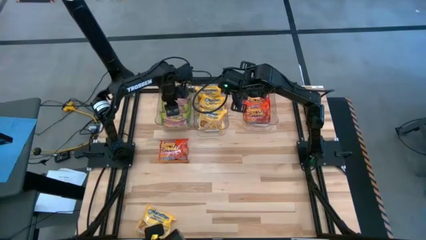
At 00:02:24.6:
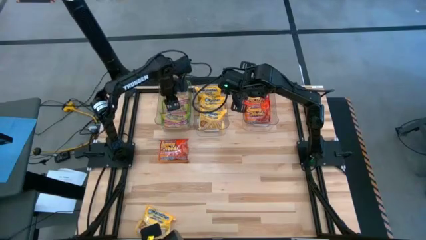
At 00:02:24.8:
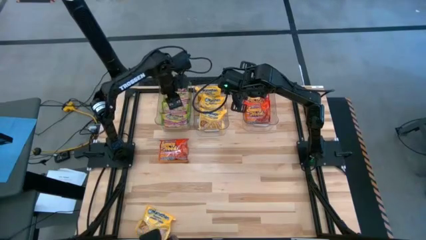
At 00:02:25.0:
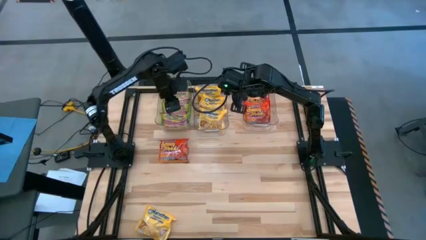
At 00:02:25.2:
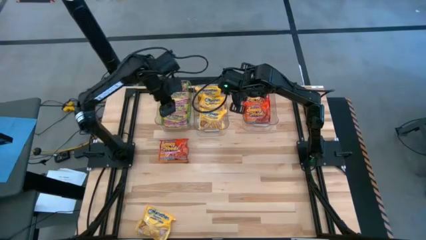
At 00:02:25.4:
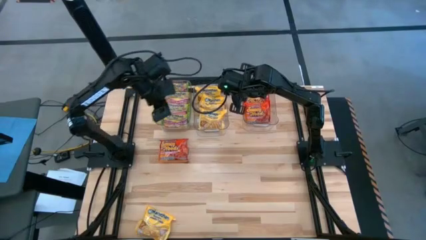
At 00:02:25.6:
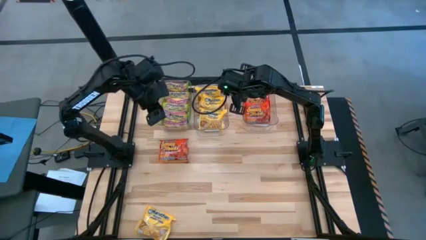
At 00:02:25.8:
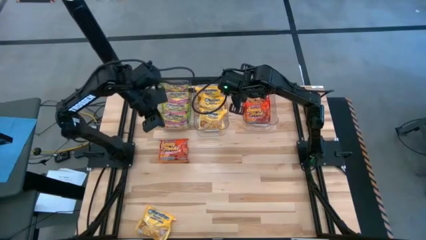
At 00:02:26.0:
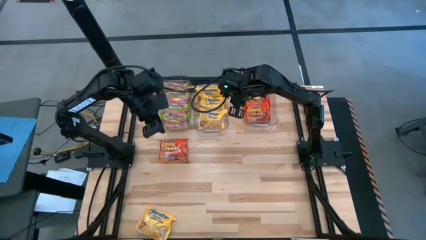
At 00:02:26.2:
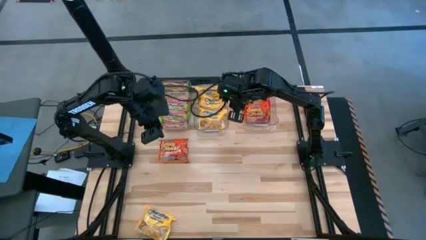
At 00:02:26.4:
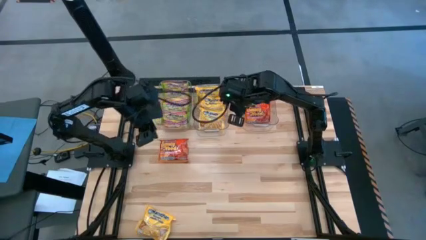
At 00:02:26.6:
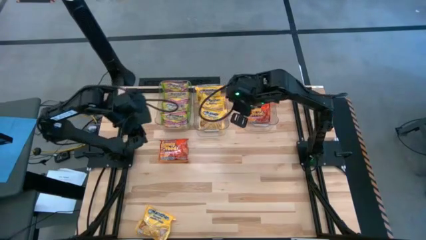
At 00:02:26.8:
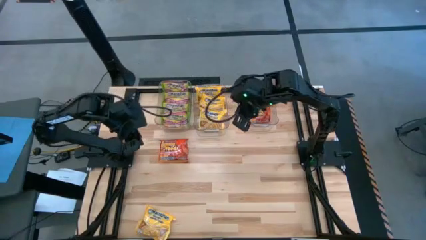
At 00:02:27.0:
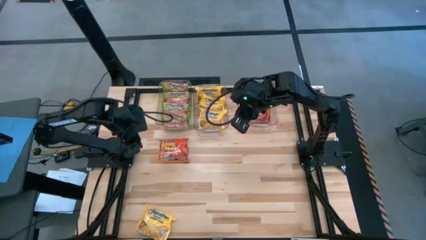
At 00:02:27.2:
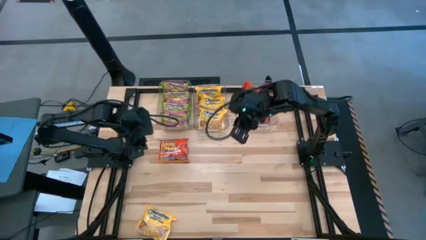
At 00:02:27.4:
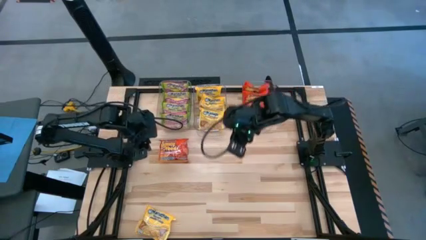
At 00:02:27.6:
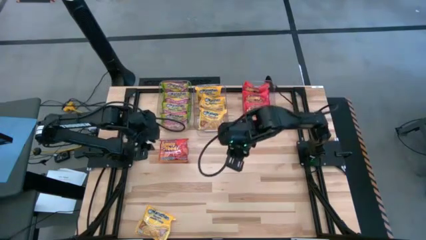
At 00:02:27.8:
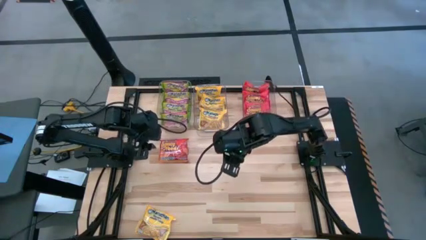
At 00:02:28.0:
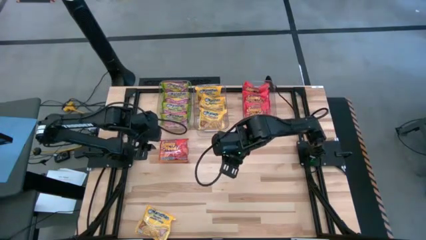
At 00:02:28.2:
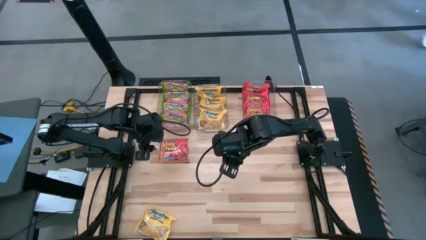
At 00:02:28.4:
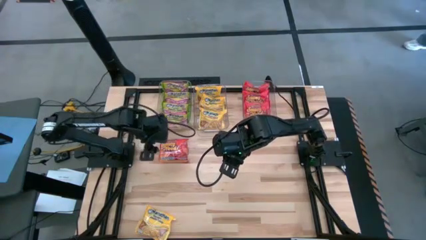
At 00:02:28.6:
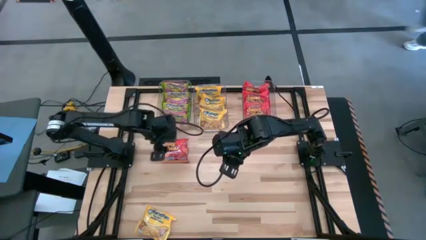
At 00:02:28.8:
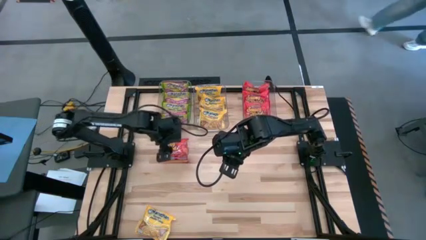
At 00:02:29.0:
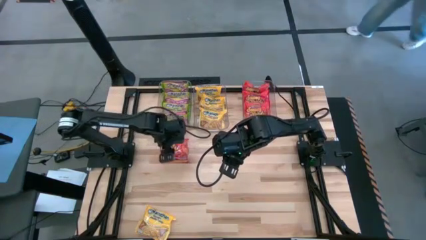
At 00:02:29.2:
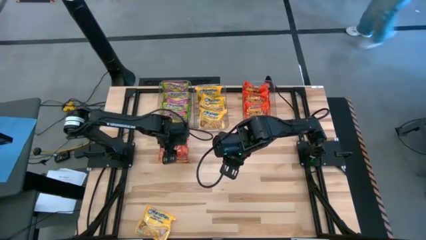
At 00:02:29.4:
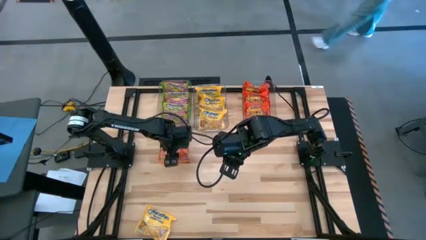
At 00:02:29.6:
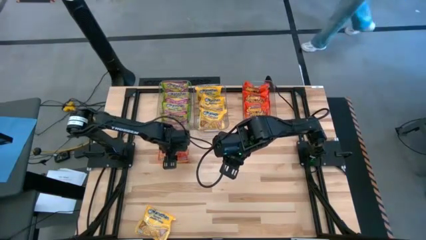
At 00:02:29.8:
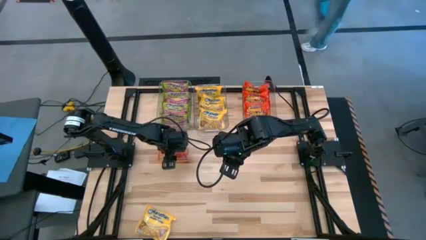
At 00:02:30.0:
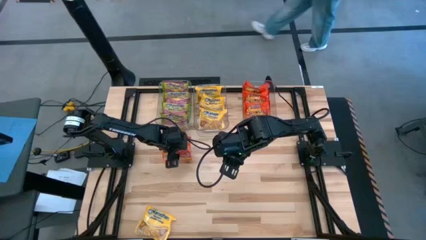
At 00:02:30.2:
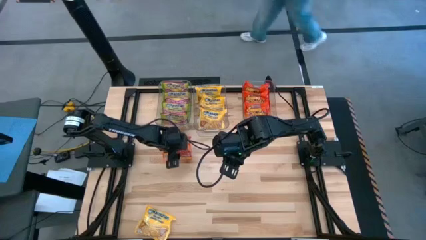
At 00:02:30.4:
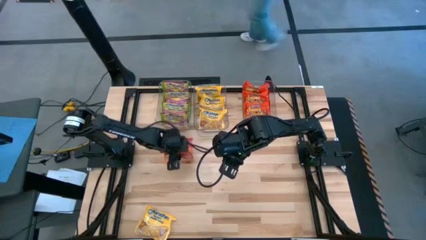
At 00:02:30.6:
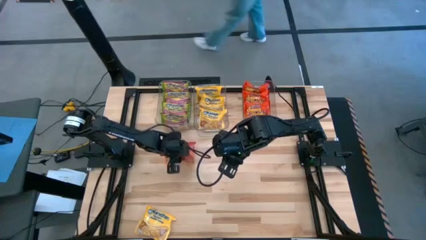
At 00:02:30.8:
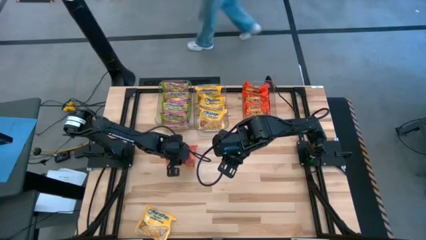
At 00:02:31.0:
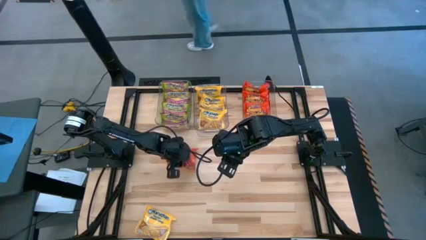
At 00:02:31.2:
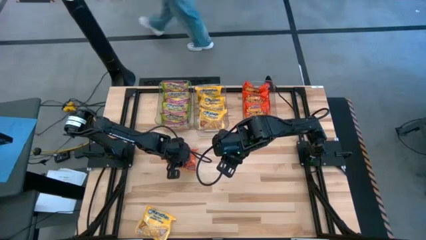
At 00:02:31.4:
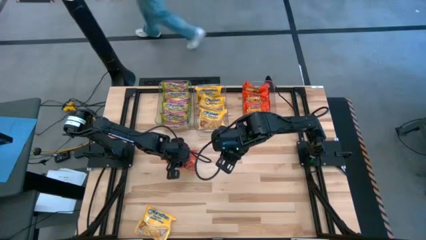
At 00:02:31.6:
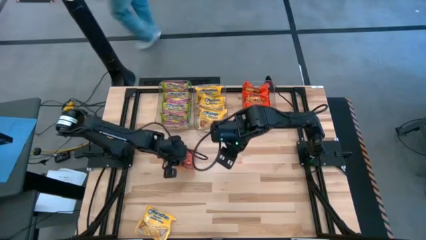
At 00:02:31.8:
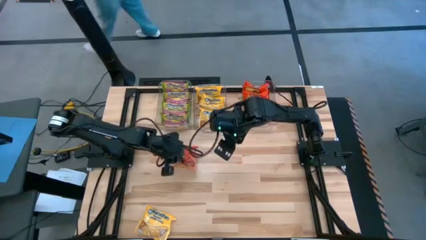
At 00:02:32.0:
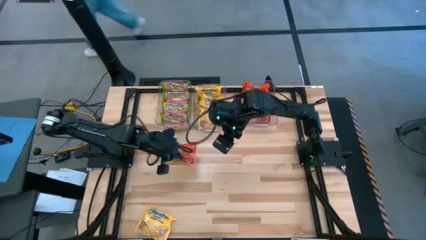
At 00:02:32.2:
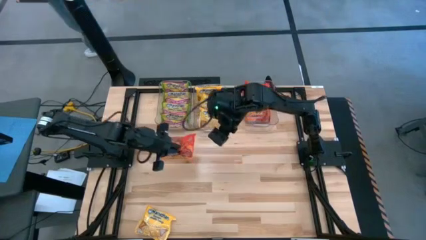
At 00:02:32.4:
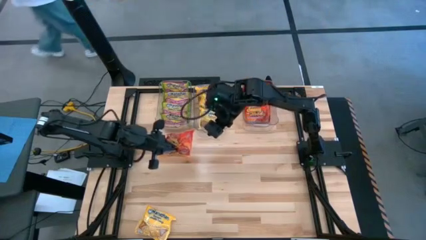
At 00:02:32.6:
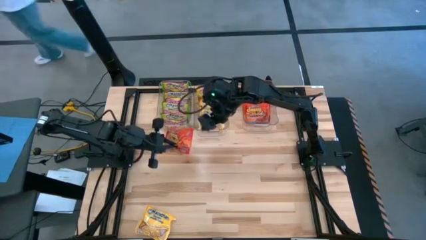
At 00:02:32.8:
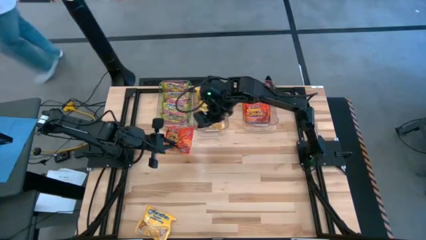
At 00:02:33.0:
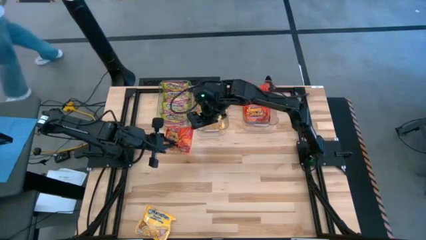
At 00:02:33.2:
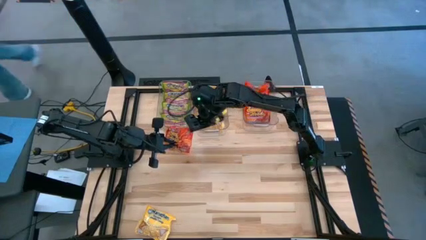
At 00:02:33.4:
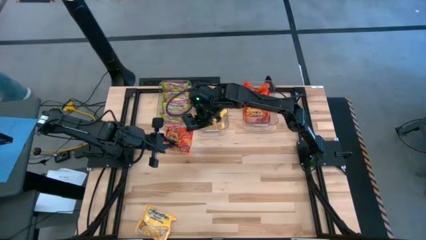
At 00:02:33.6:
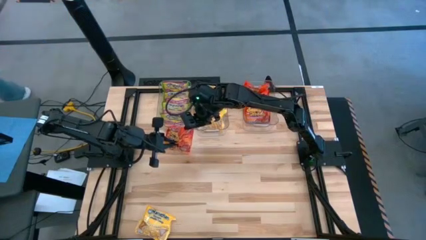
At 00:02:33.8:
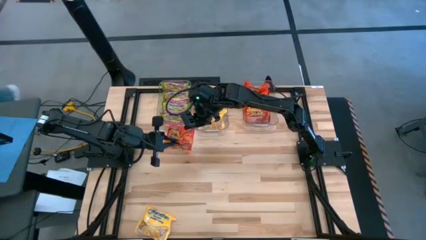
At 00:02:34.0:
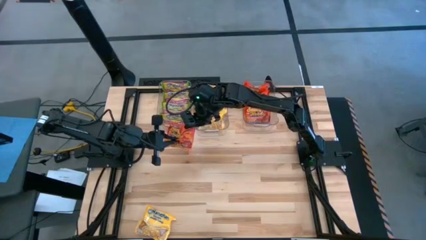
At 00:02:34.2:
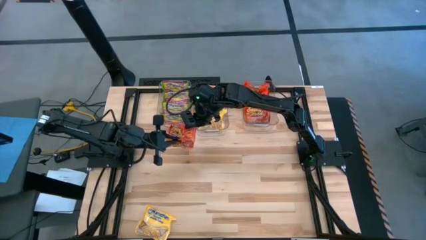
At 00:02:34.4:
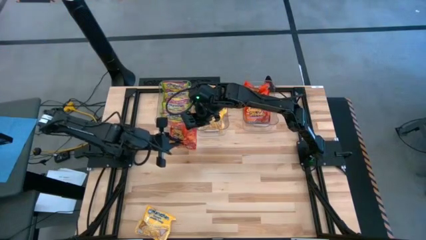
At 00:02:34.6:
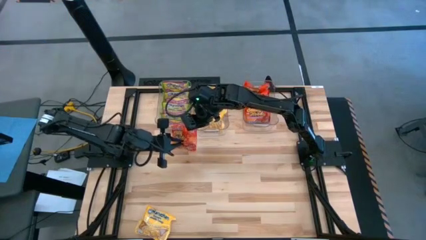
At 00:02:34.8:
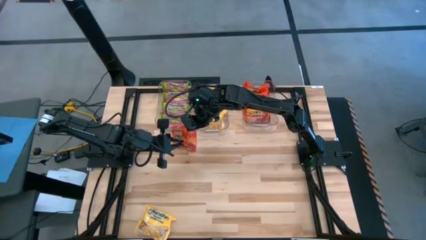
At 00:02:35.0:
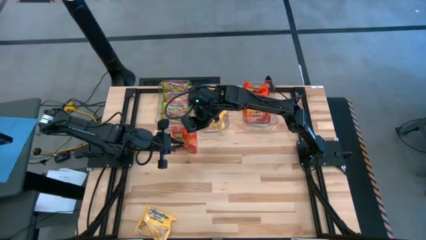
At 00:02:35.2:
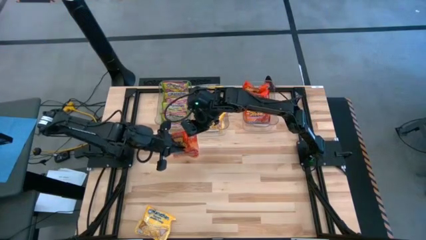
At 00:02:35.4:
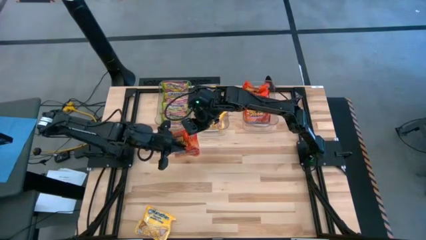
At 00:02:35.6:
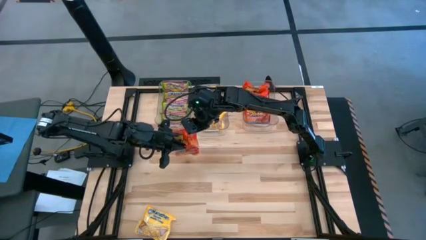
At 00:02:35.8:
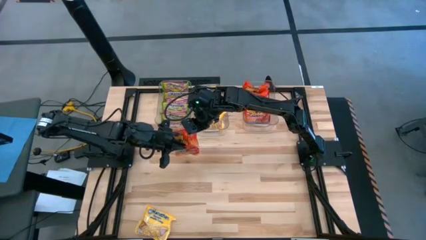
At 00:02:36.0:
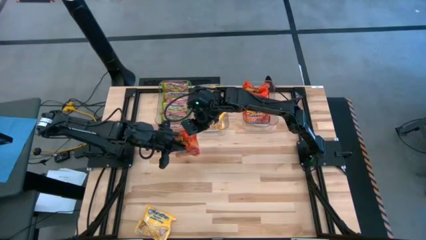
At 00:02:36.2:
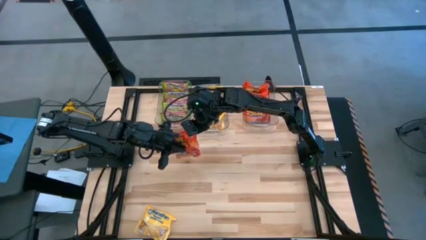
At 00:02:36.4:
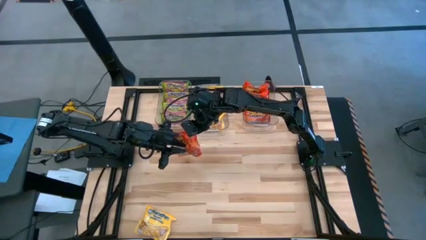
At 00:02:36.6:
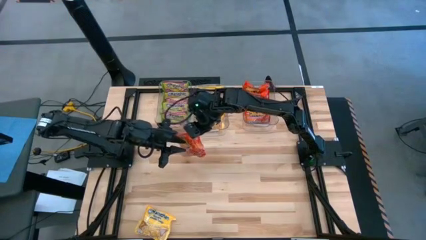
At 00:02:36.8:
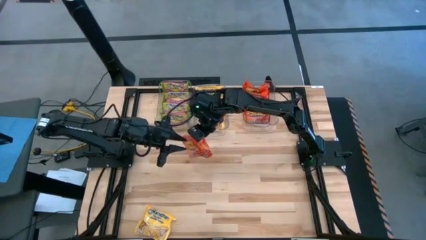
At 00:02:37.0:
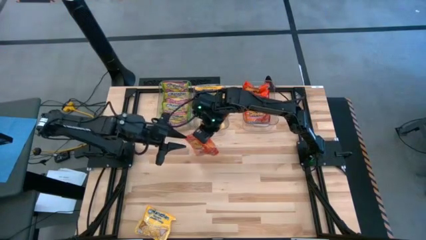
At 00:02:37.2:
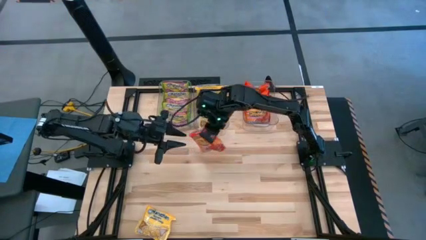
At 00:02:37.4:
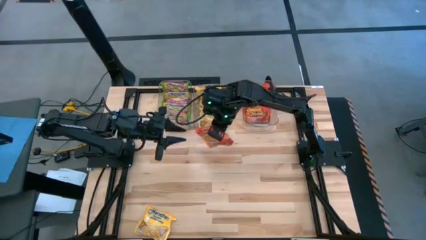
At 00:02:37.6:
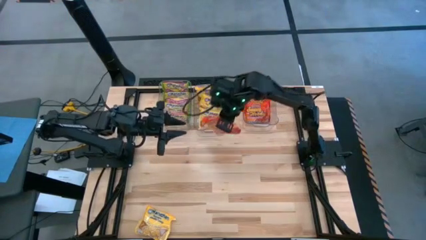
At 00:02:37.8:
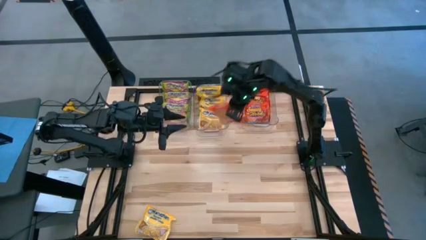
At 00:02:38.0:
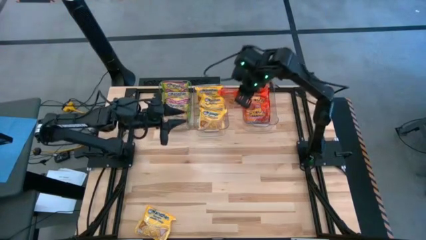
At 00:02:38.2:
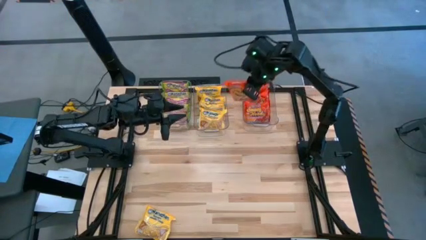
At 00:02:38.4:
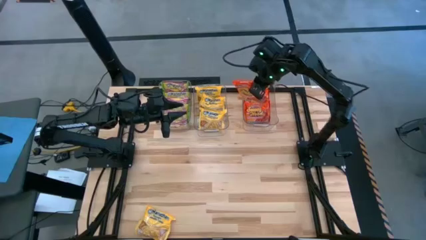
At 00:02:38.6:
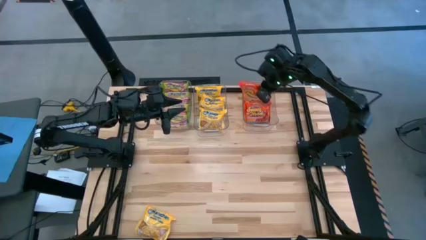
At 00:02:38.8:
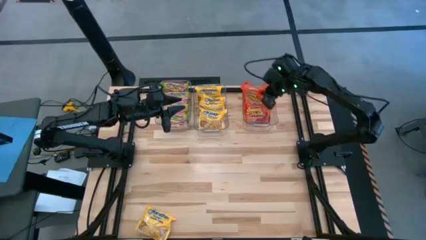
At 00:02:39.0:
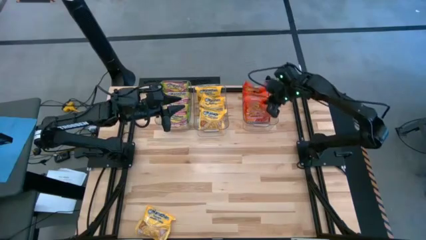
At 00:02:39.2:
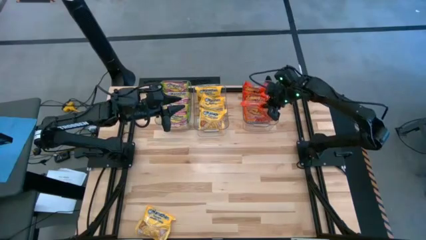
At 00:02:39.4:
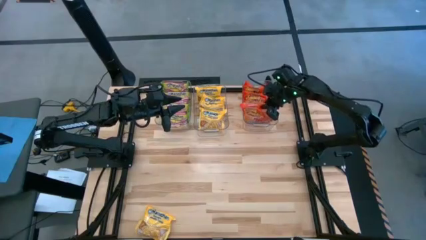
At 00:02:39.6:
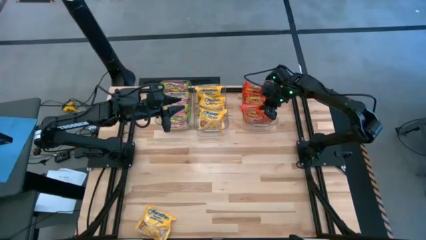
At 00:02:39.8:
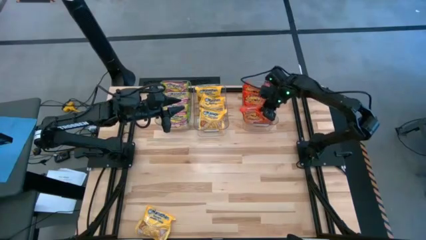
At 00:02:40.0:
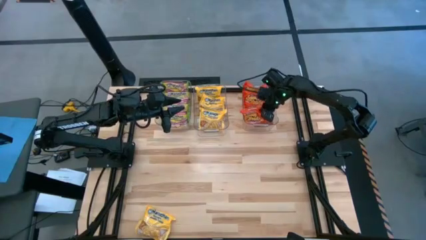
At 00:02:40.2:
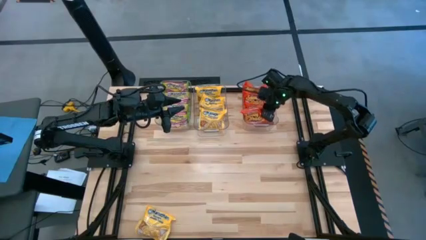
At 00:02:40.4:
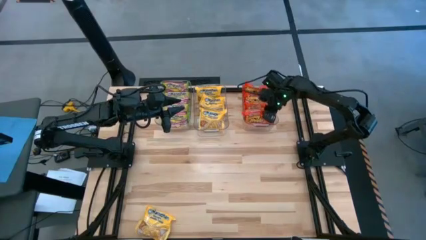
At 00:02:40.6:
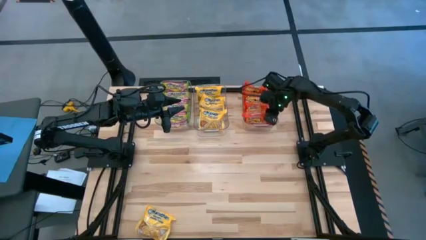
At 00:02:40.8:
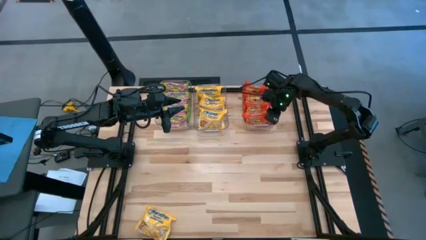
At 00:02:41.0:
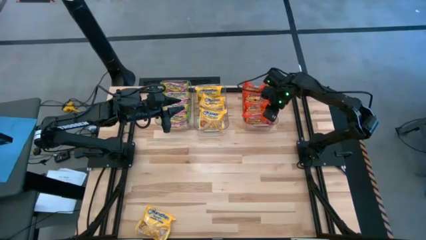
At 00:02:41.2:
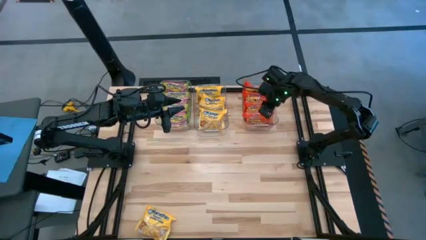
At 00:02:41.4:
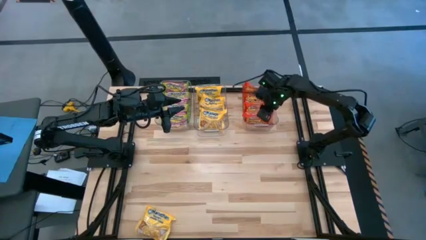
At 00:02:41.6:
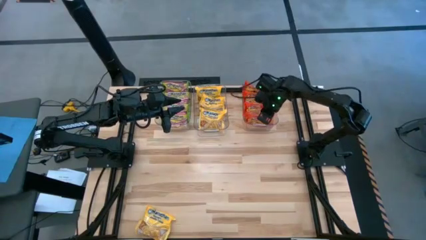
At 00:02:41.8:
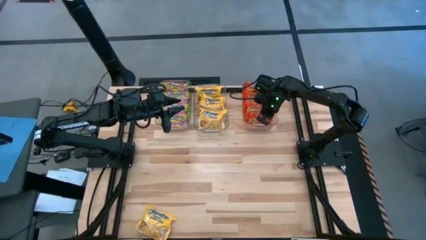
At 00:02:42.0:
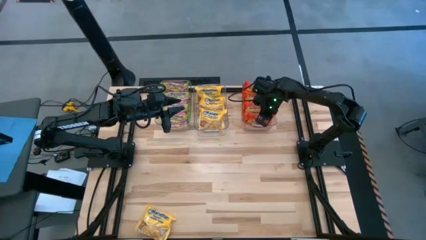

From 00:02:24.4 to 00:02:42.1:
Task: Sort Maruchan noodles
Put the orange noodle pack into the right transparent bin
